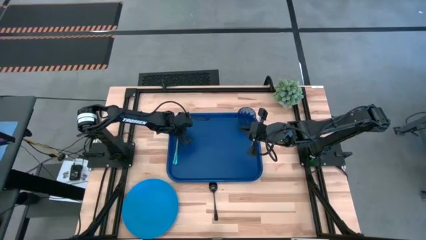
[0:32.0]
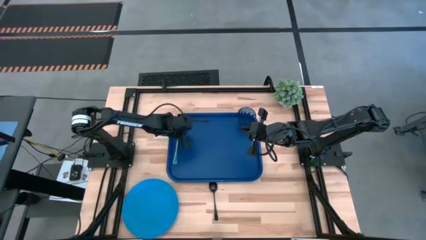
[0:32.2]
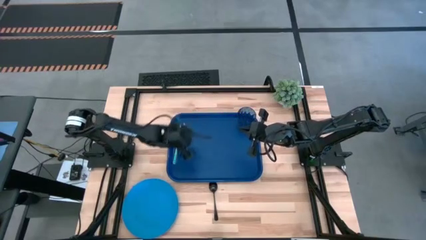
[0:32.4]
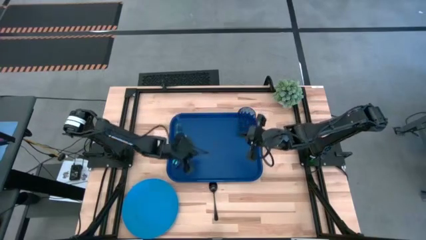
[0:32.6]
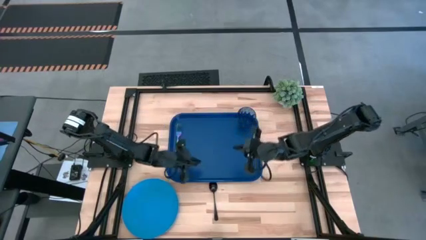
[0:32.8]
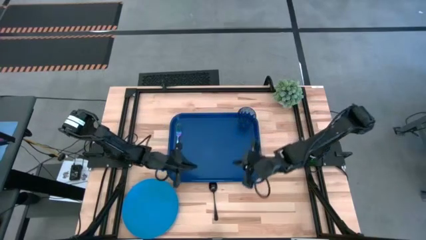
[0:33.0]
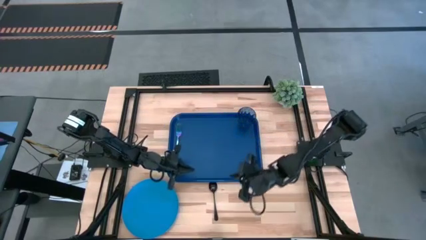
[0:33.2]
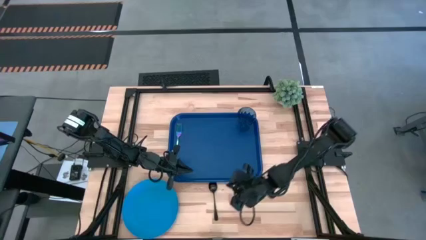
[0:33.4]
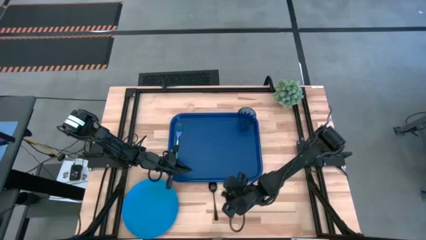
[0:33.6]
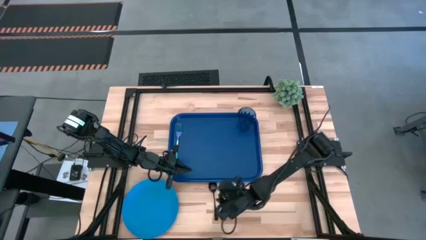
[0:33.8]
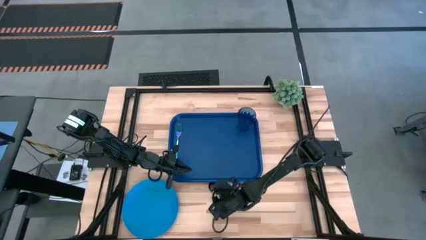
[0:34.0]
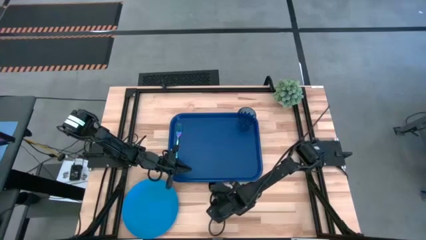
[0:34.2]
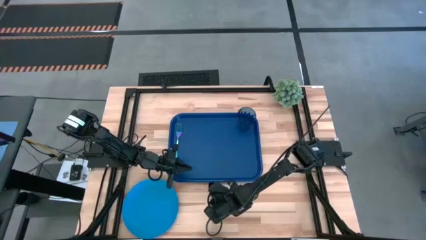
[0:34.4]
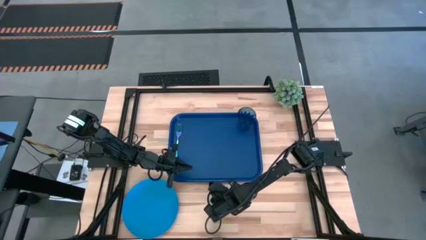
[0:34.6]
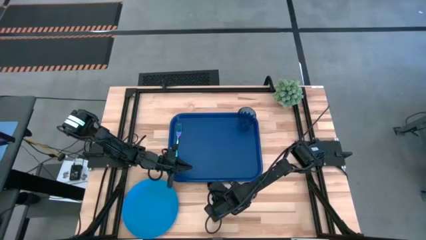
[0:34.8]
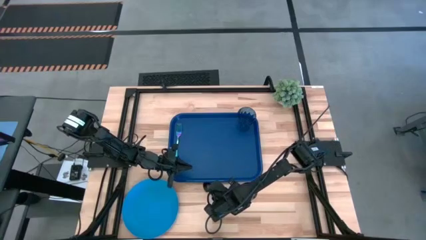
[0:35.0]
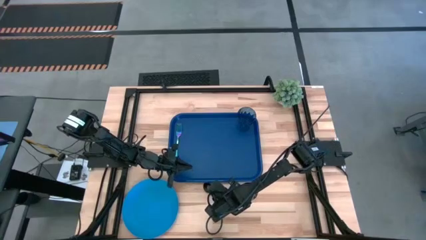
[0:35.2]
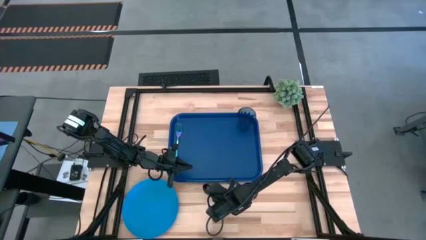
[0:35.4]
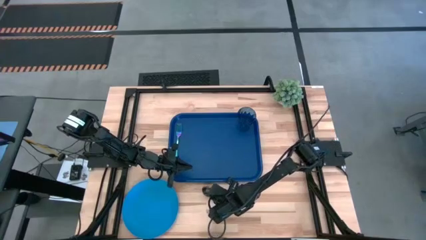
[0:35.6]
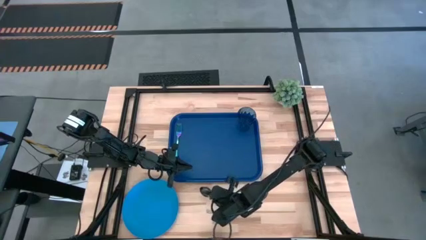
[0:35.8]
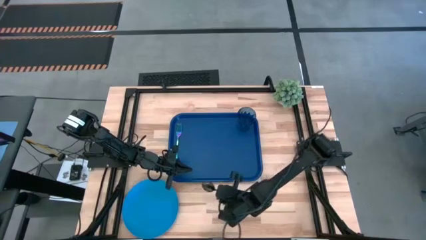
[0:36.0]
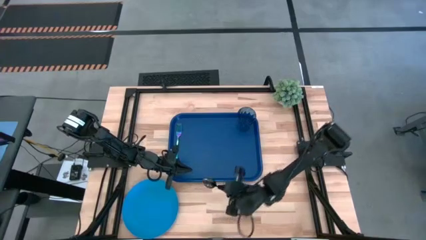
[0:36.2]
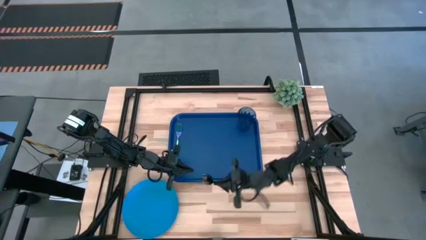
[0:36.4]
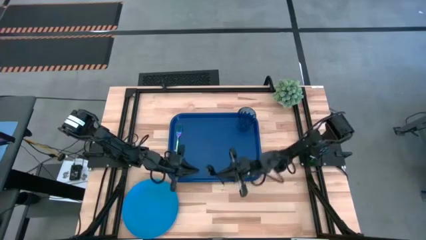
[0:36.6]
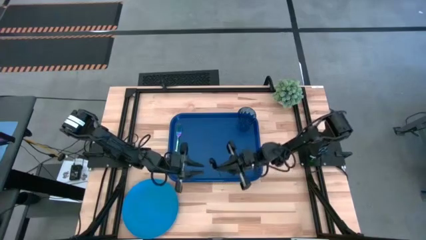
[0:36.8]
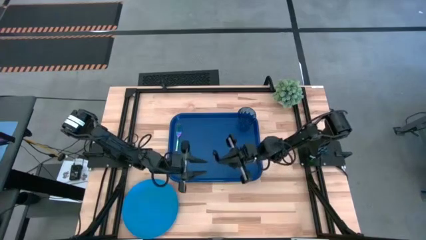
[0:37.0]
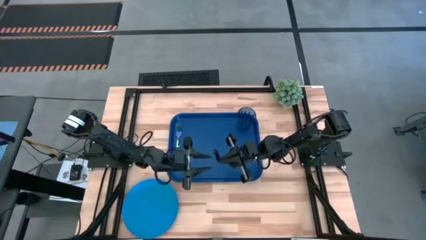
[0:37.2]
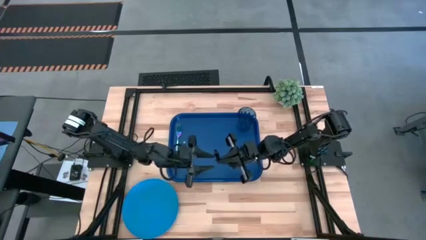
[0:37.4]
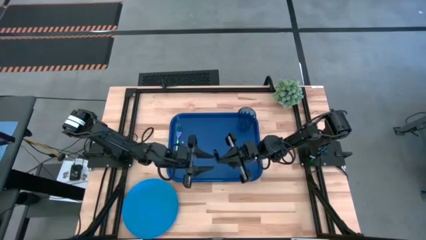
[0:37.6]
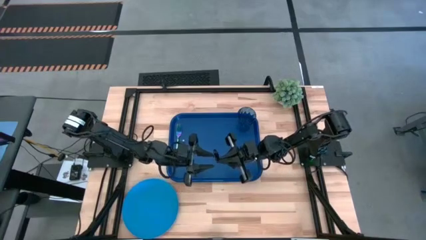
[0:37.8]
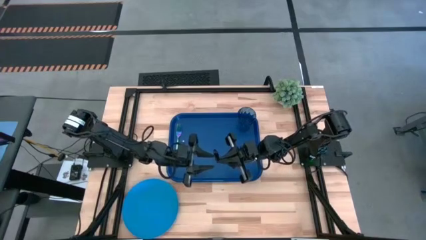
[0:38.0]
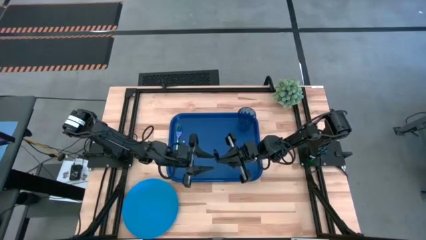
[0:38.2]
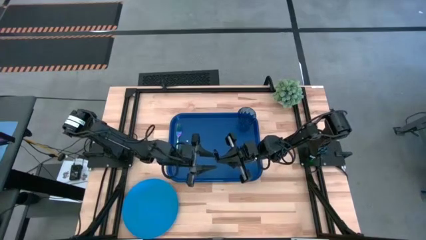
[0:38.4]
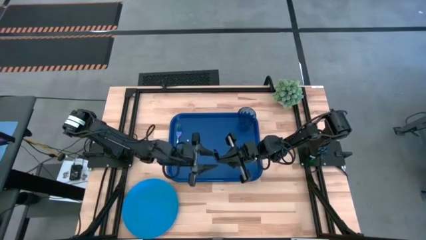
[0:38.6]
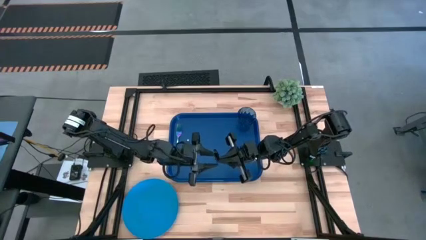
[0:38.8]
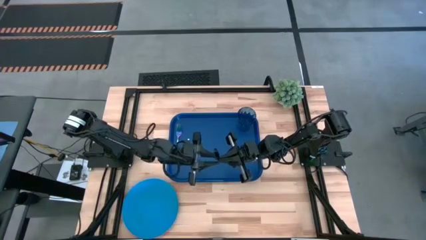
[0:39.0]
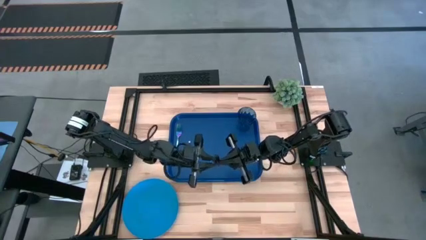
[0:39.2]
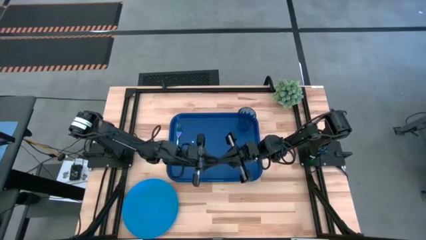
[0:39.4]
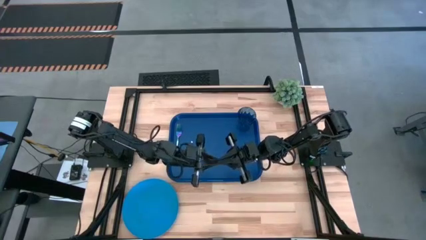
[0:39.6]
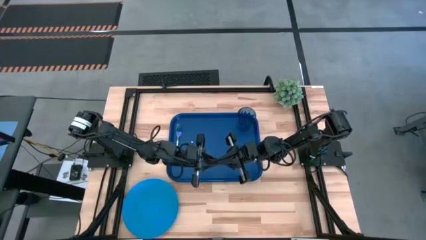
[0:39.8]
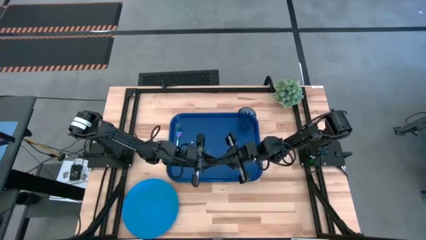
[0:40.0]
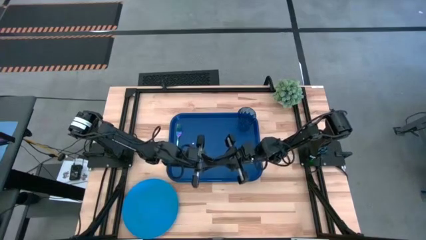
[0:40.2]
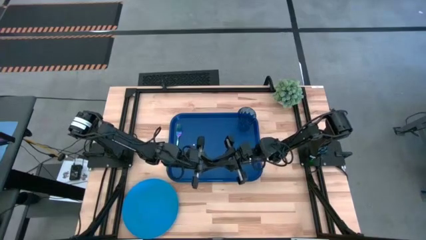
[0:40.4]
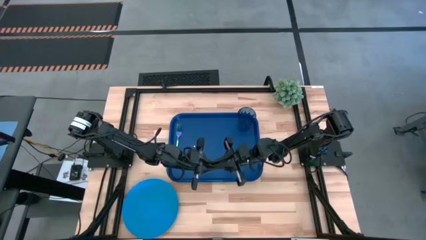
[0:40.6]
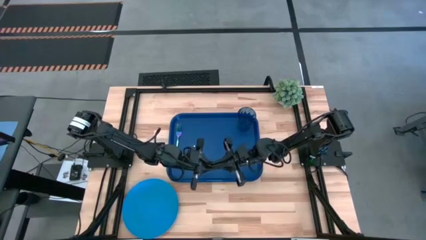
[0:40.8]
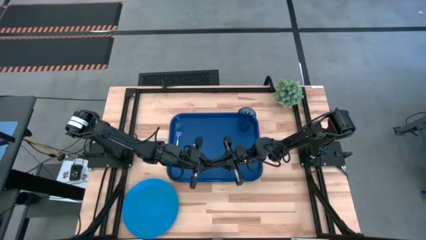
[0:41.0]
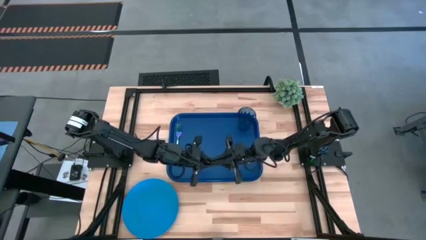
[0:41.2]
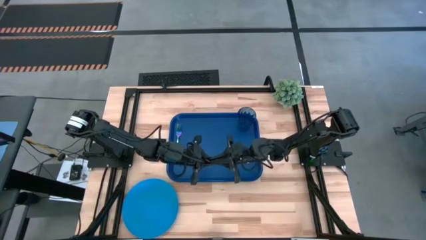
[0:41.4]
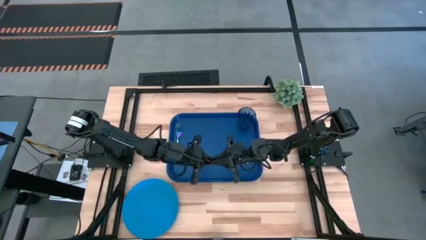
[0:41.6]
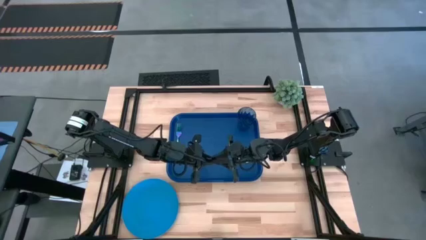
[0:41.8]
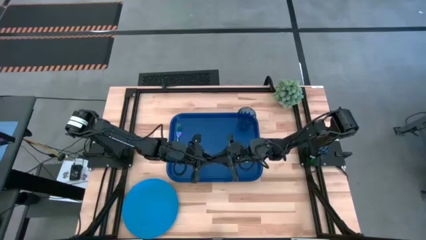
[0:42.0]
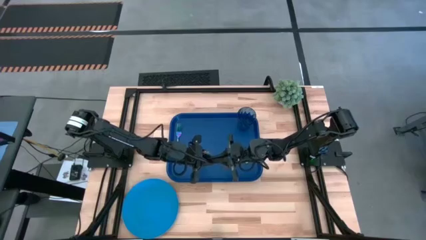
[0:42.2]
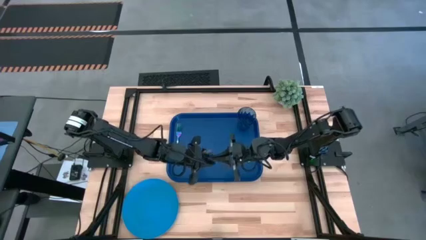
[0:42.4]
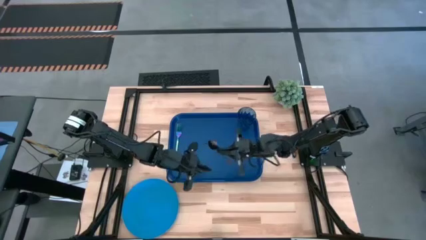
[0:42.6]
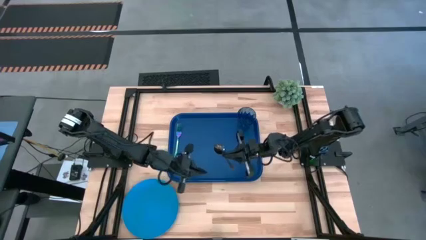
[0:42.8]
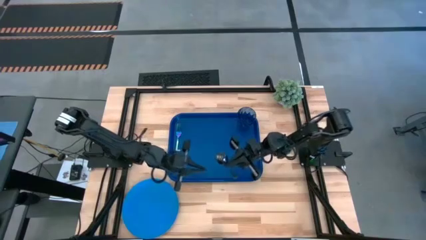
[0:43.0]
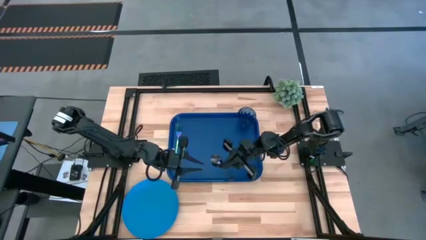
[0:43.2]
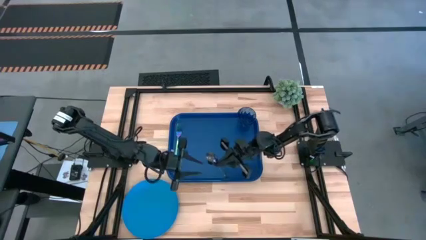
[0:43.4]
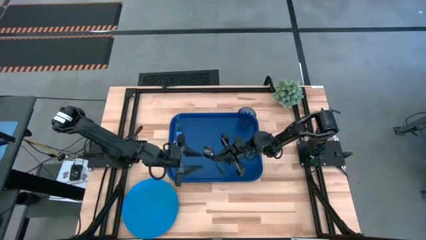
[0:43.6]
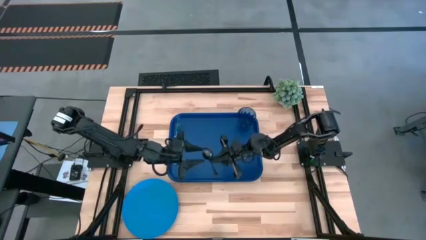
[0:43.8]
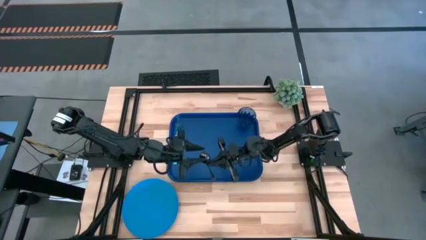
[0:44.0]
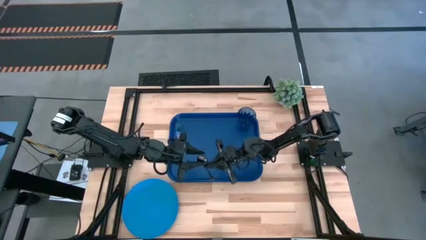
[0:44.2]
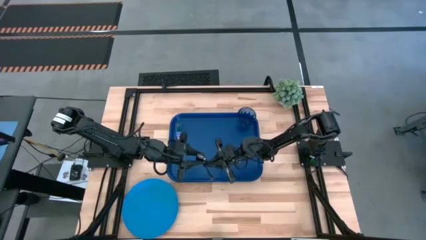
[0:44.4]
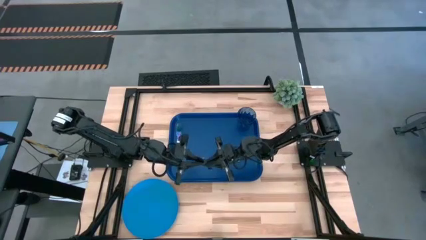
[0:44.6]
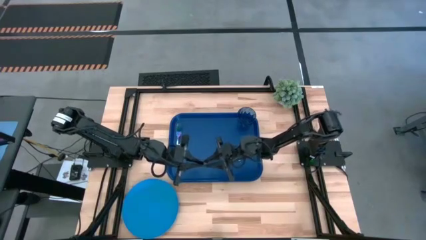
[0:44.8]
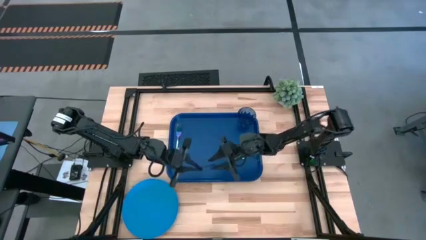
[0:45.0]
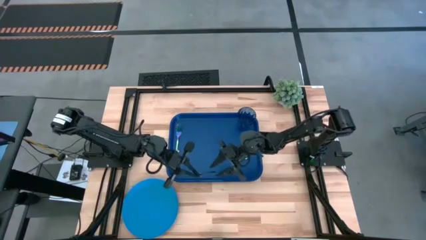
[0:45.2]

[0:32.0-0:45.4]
Task: Pick and place plate/cup/fork/spoon on tray
Put the black spoon on the right side of the fork on the blue tray

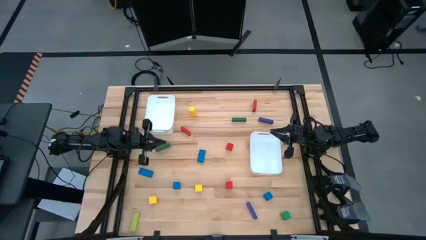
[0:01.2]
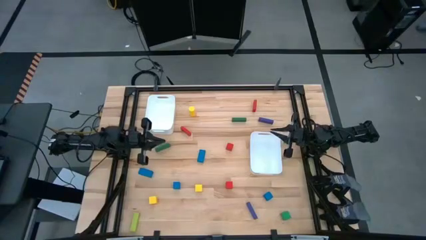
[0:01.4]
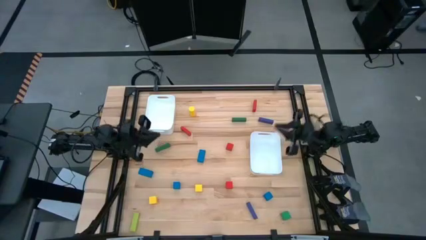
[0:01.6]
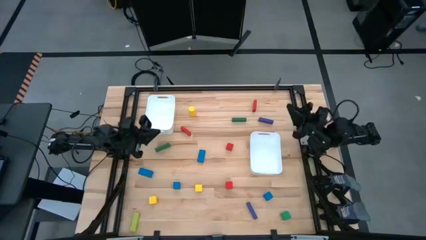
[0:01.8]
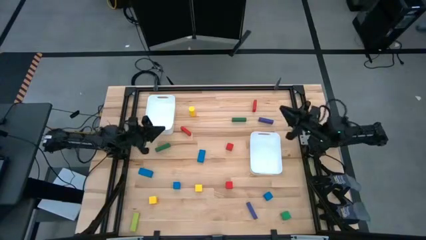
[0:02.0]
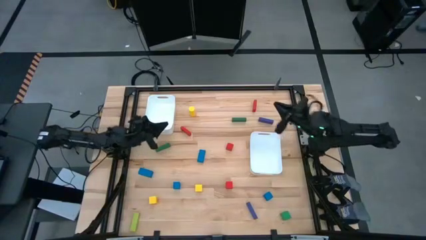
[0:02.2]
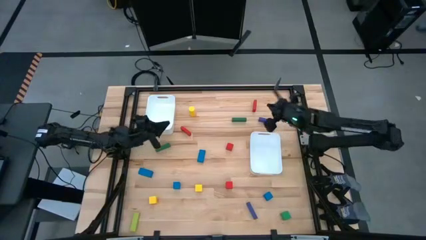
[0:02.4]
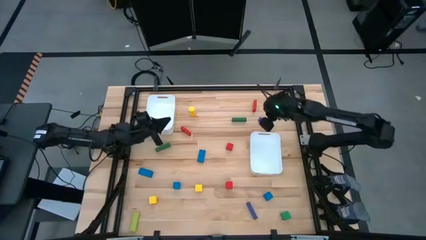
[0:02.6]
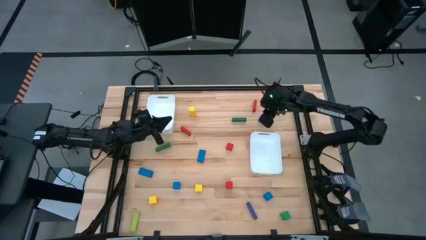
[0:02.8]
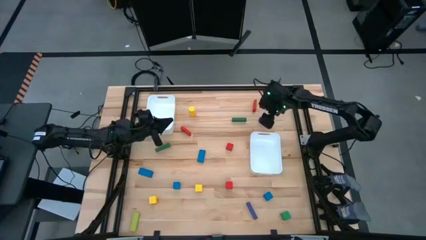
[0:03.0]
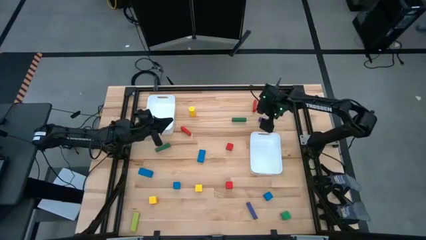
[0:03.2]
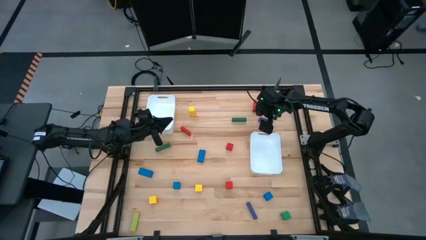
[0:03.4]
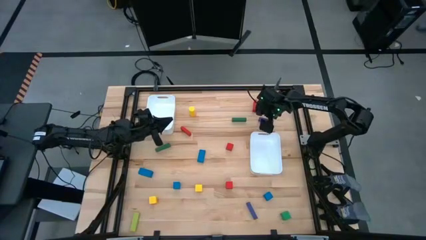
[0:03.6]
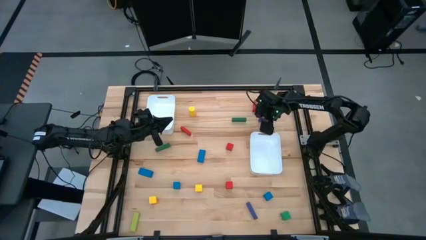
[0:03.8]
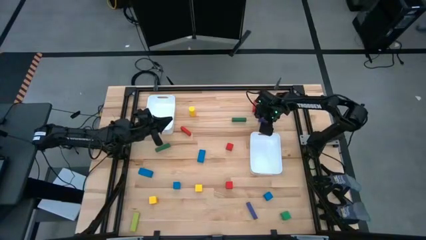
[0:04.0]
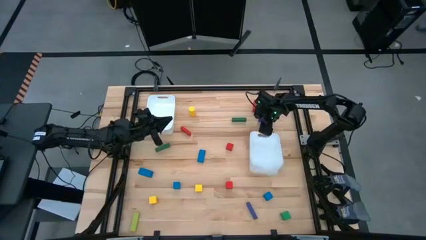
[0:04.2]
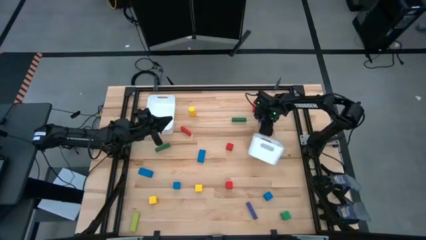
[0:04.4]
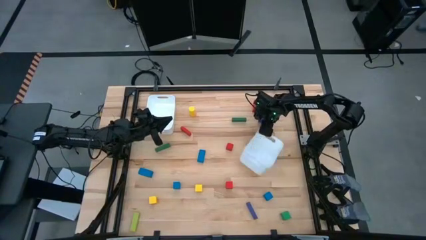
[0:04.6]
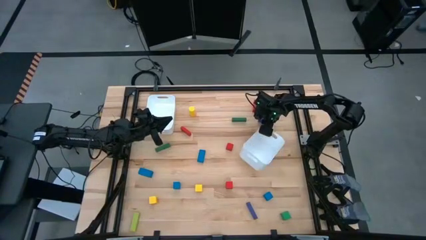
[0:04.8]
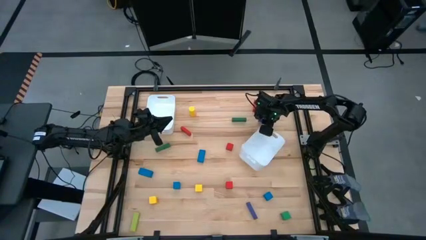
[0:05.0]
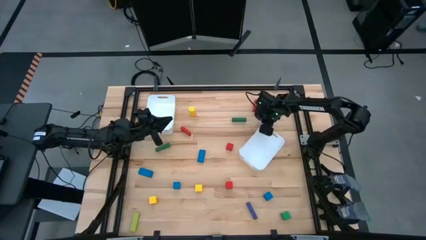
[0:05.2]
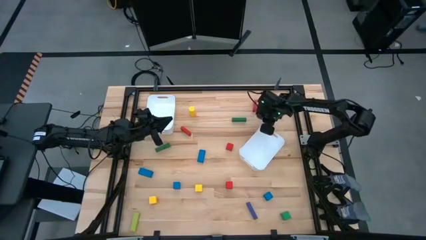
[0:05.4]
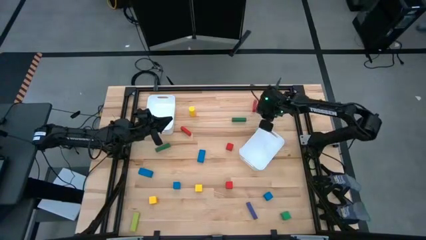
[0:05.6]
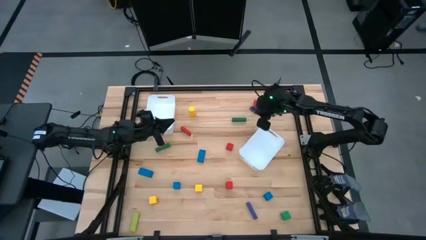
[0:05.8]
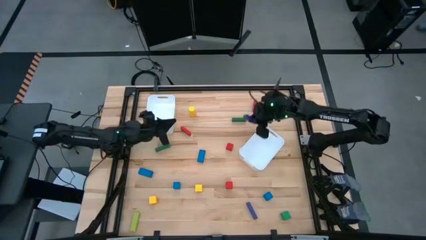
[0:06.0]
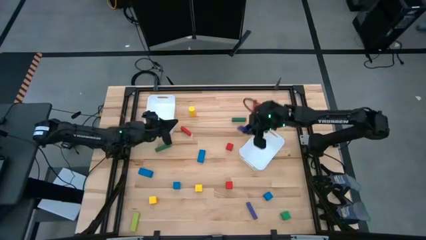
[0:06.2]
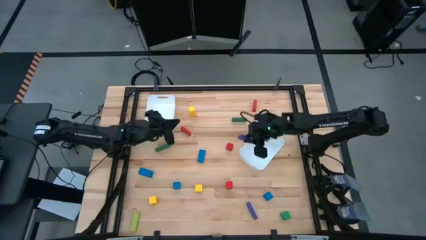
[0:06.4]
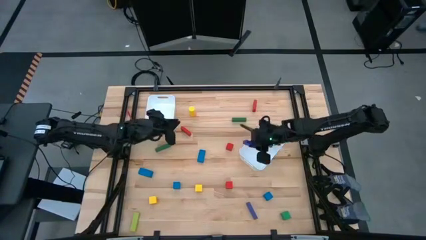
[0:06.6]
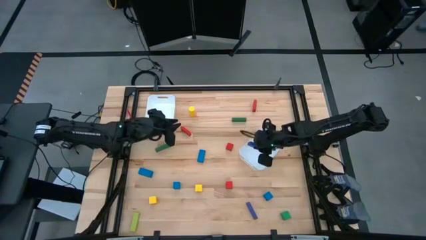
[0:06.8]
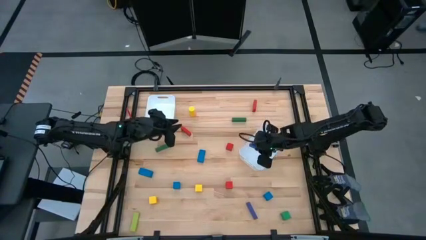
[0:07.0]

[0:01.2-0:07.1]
Task: Sort blocks by size
Put the top purple rectangle block into the right white bin
